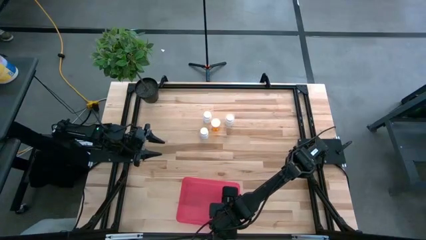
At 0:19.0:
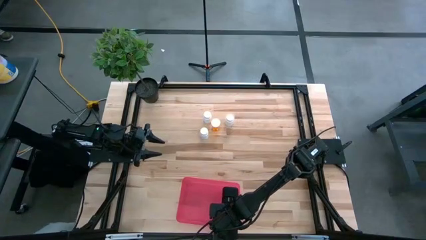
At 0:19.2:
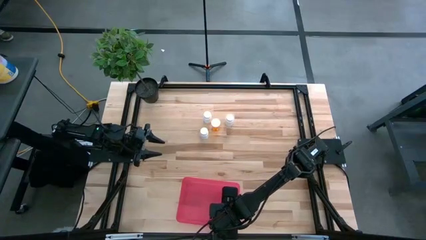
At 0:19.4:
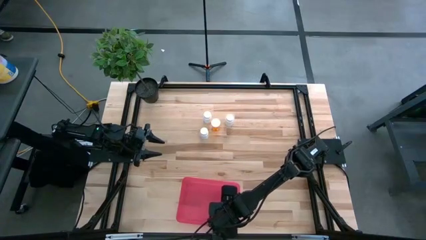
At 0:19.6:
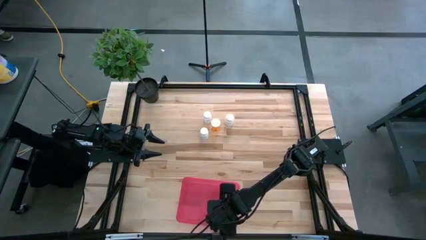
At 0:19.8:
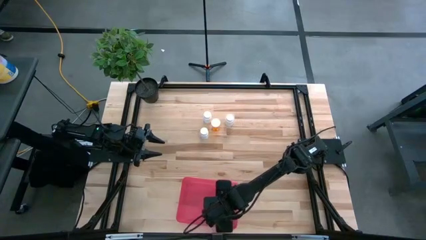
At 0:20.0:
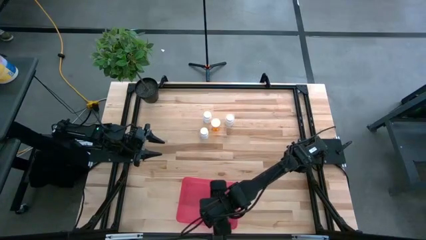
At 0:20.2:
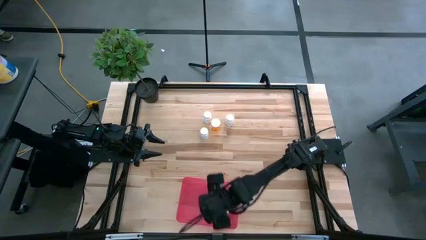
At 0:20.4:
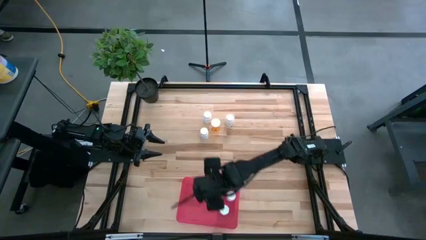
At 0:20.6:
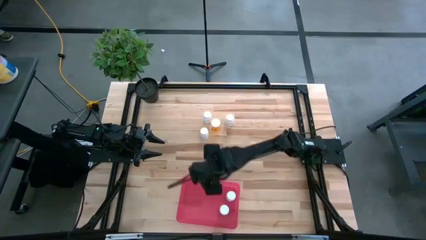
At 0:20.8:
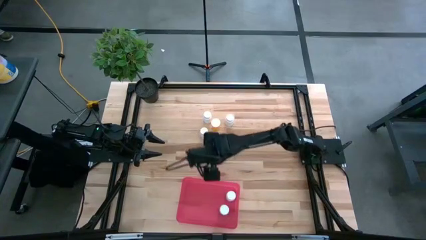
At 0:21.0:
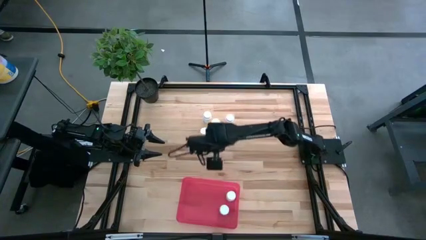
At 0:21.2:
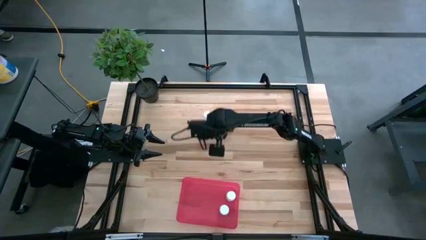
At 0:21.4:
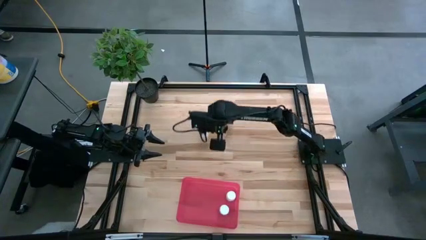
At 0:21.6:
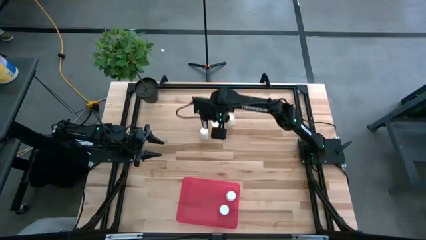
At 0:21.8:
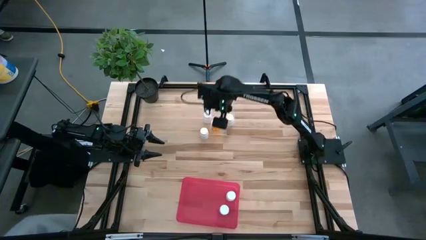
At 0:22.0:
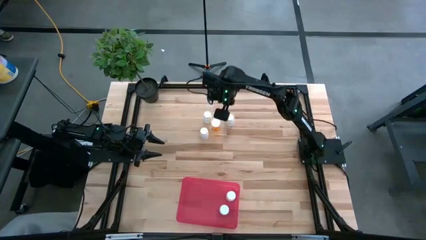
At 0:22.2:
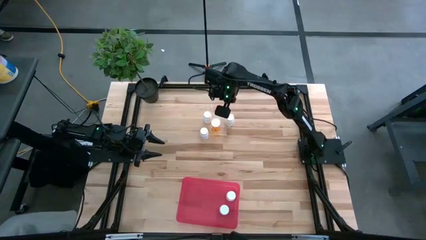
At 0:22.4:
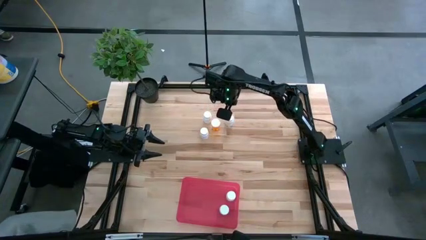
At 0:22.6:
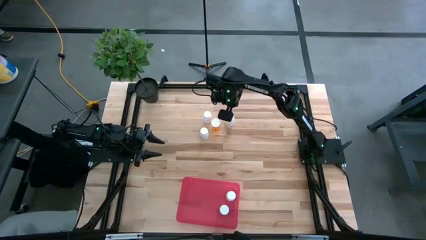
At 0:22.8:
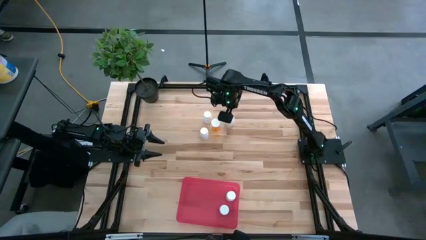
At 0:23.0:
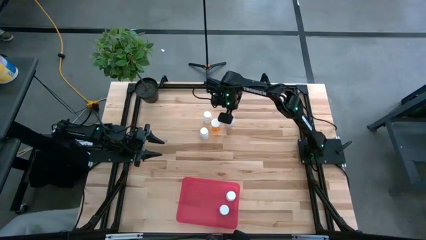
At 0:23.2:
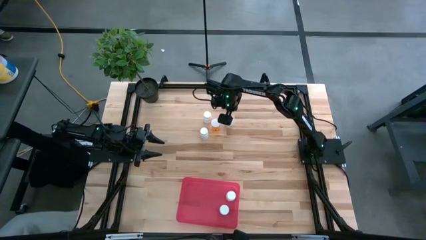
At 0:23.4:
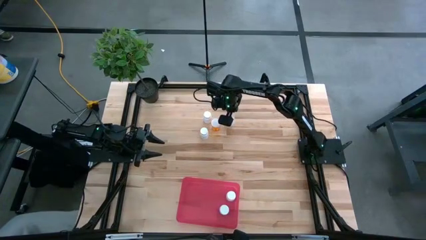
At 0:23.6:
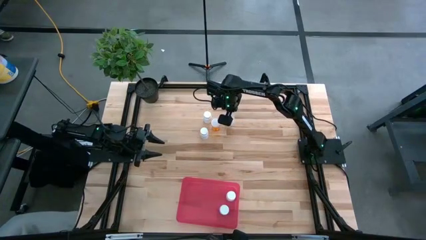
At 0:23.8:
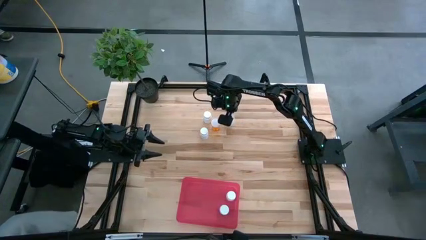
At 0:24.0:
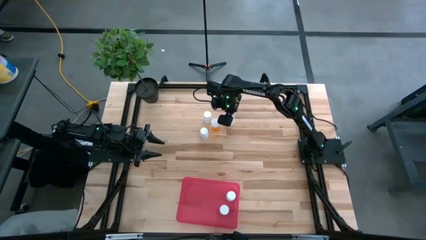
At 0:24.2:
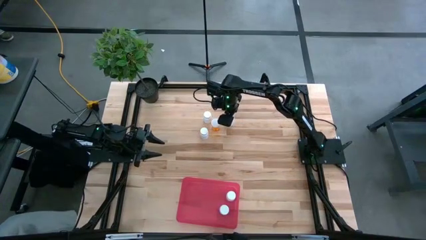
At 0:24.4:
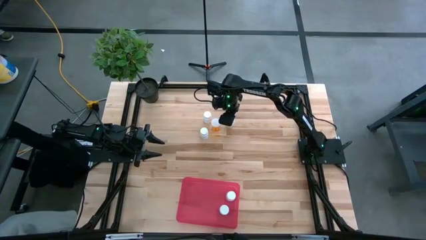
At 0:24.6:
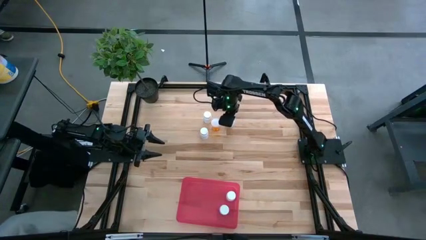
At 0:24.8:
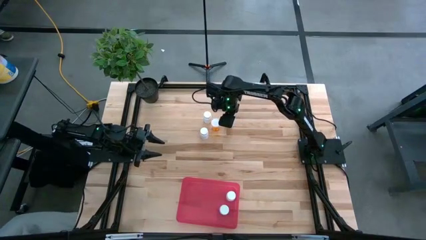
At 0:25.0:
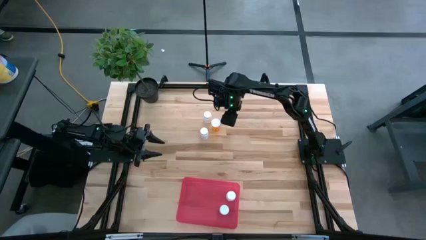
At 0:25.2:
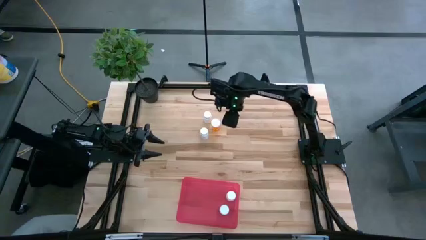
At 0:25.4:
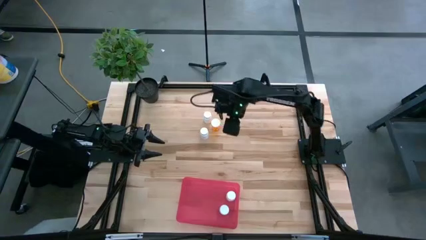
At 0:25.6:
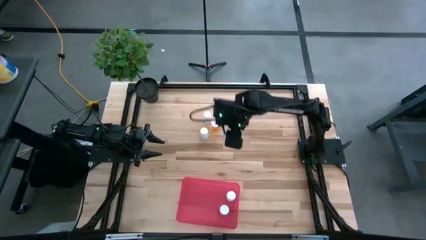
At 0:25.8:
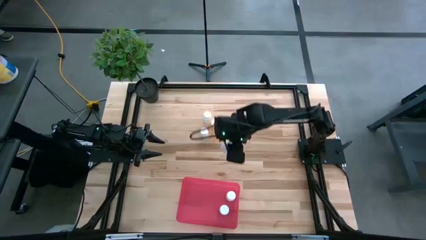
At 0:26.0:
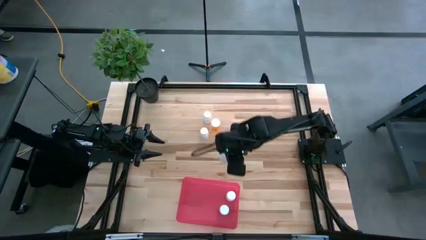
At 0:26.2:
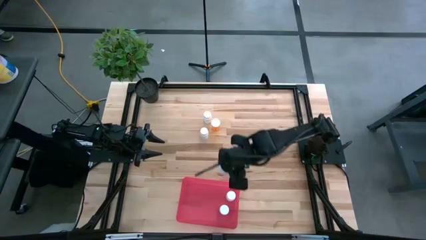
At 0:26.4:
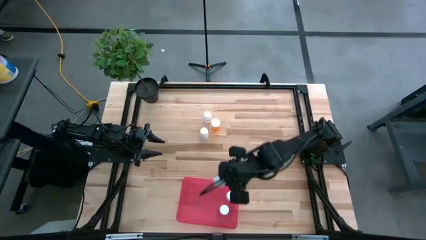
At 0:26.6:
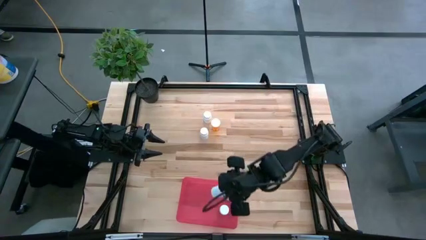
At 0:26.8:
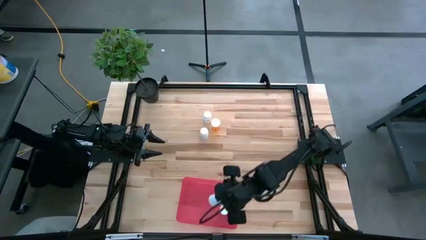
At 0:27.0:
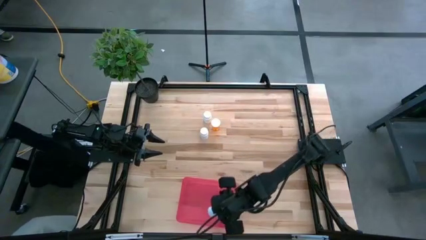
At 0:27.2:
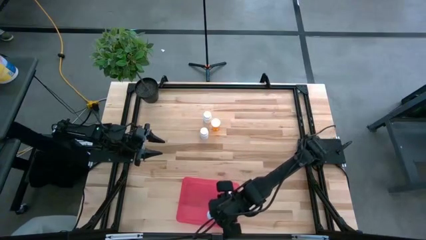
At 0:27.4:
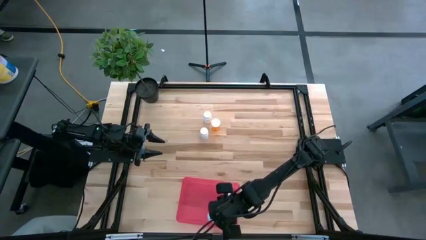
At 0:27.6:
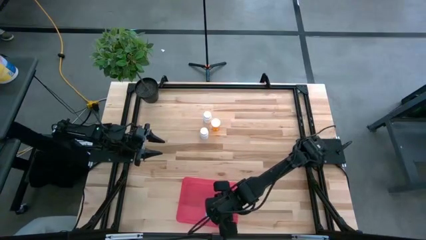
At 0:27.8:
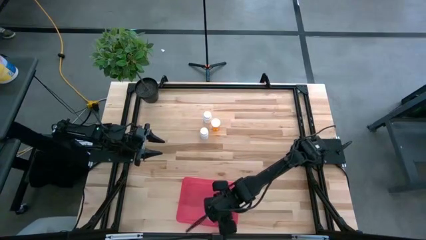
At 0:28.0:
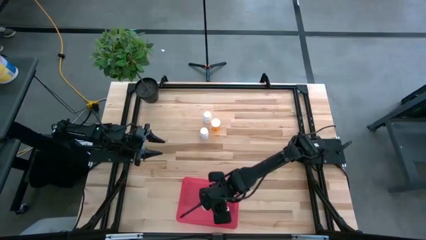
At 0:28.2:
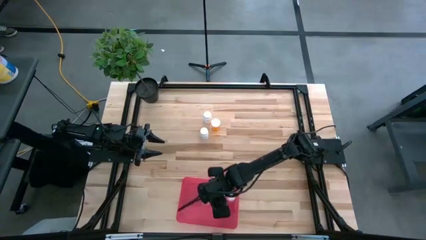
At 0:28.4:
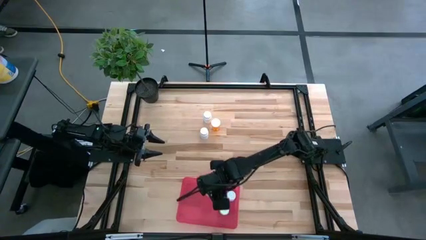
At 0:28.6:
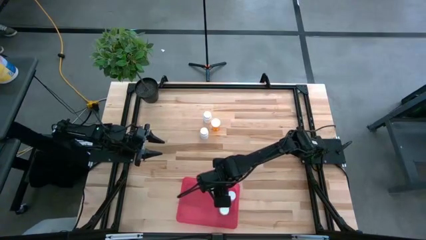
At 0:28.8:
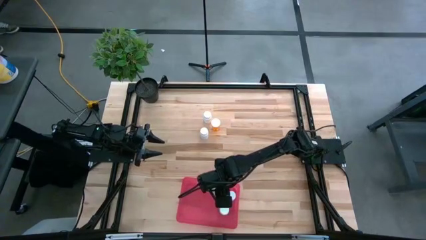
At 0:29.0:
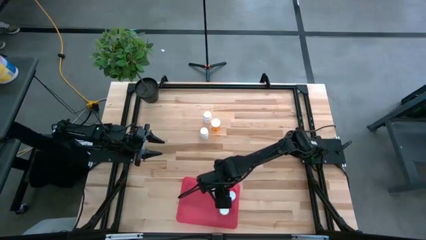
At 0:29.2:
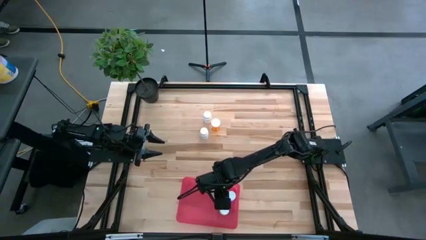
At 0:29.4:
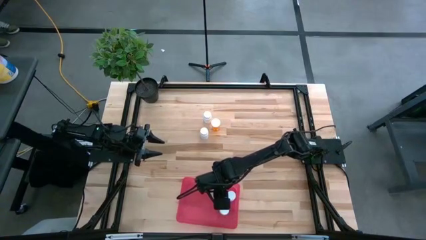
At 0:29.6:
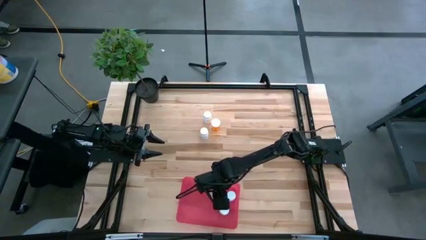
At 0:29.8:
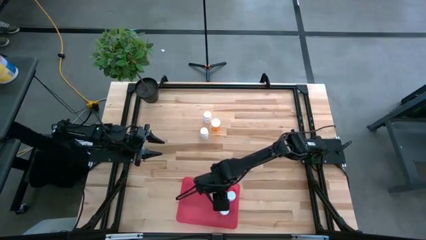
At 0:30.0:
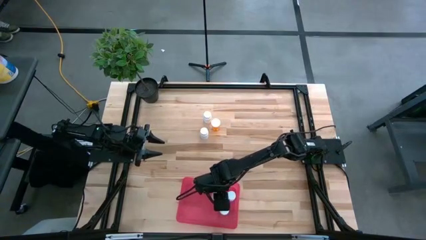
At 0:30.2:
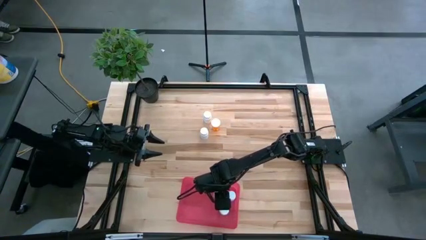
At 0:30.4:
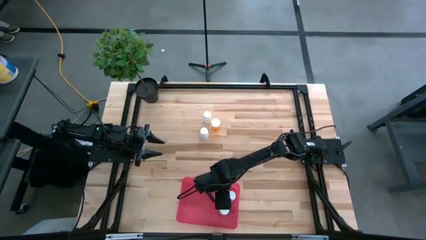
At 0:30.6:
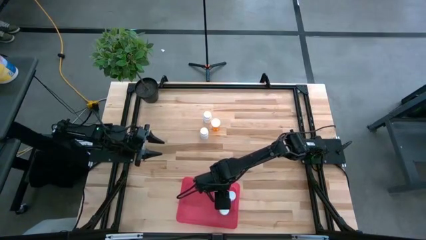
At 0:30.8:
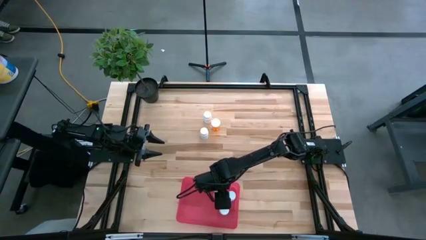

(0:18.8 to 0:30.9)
Task: Pick and place pill bottles into a basket
Put the white pill bottle into the red bin

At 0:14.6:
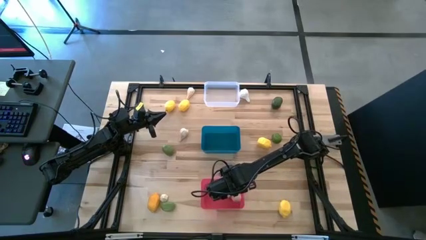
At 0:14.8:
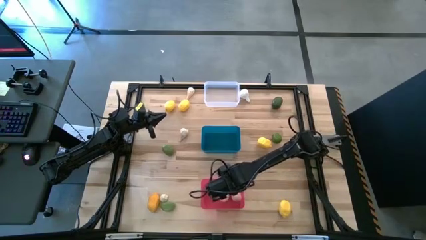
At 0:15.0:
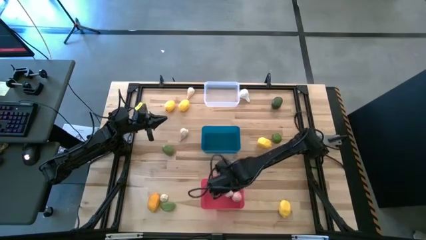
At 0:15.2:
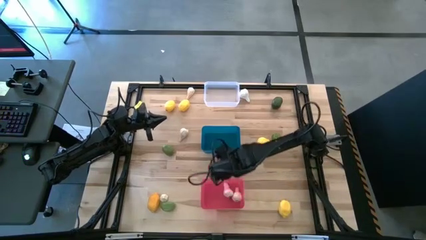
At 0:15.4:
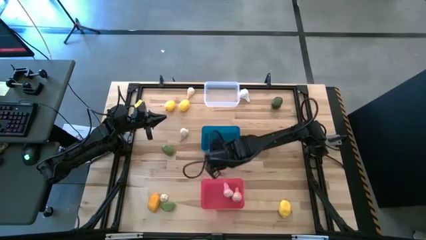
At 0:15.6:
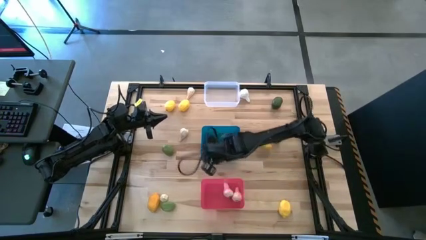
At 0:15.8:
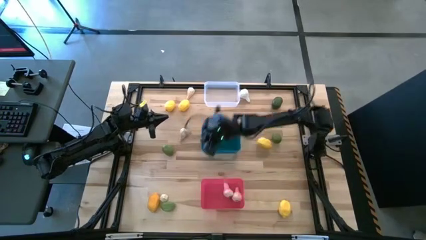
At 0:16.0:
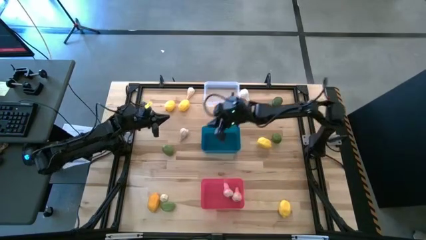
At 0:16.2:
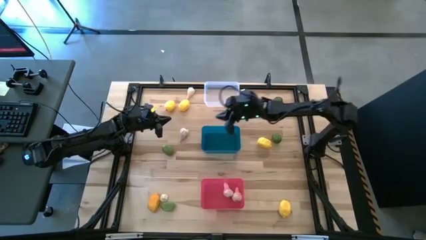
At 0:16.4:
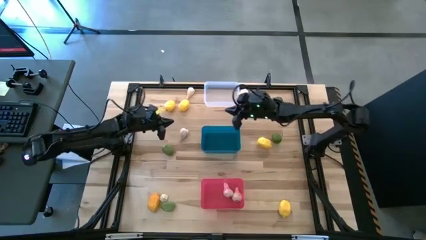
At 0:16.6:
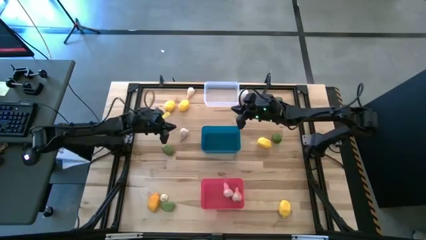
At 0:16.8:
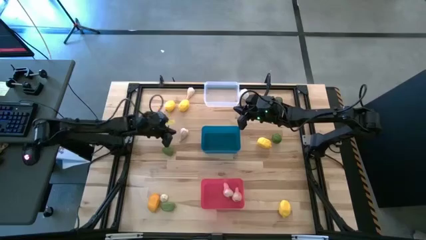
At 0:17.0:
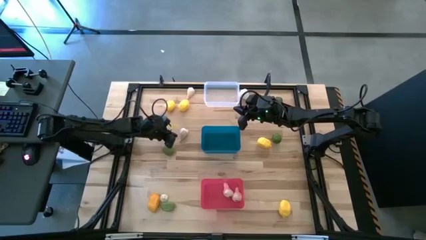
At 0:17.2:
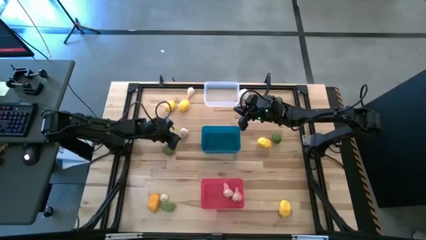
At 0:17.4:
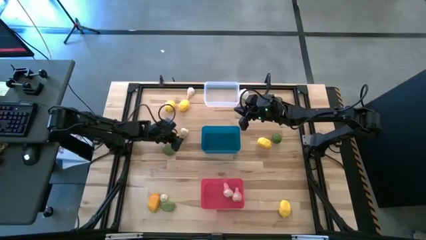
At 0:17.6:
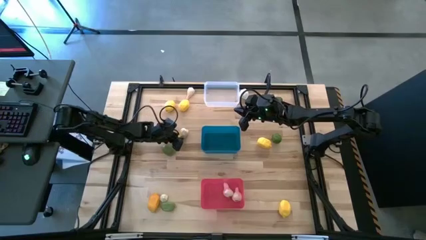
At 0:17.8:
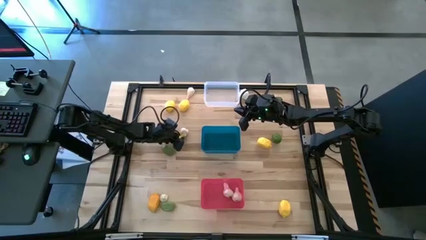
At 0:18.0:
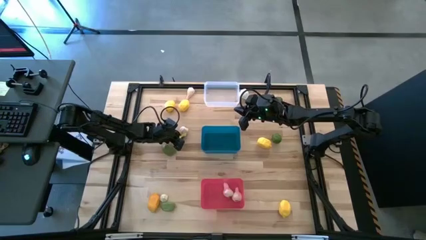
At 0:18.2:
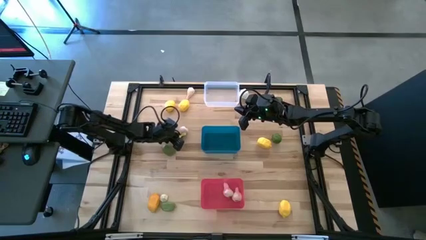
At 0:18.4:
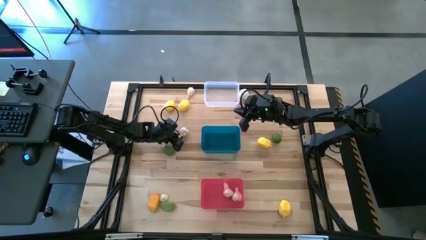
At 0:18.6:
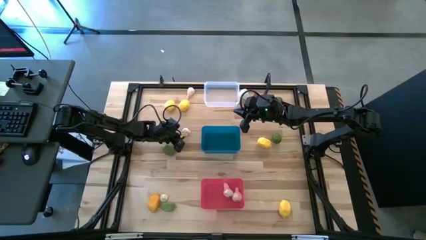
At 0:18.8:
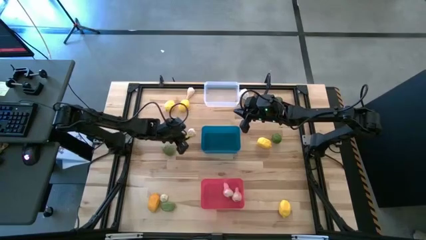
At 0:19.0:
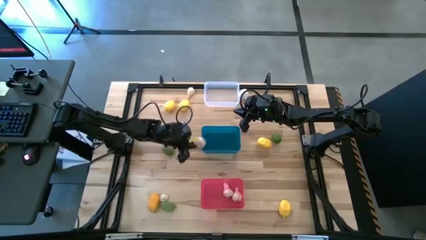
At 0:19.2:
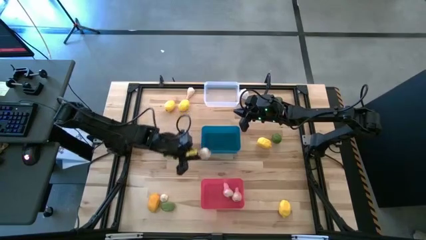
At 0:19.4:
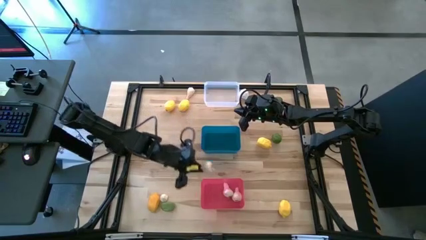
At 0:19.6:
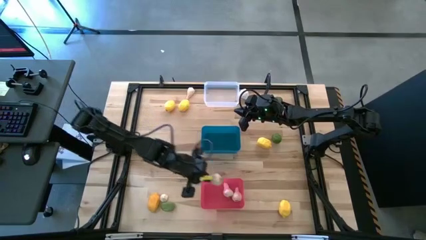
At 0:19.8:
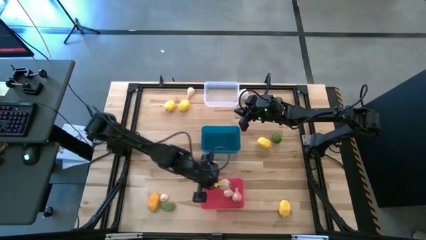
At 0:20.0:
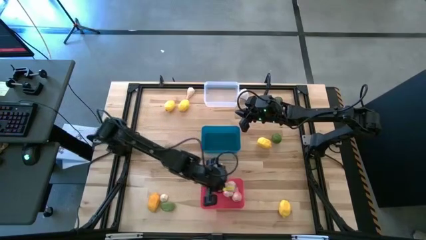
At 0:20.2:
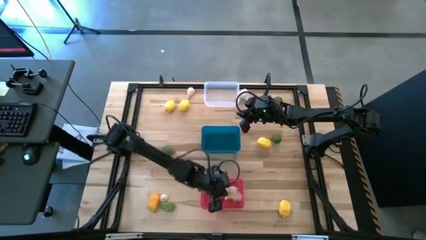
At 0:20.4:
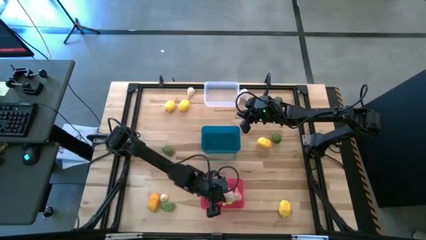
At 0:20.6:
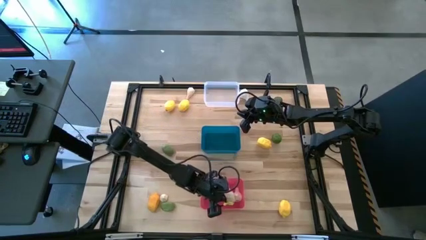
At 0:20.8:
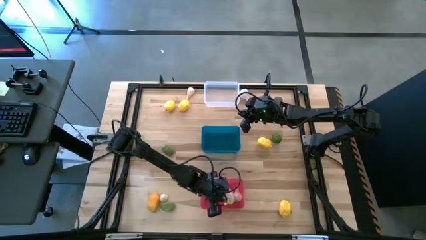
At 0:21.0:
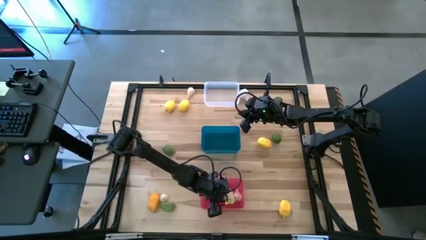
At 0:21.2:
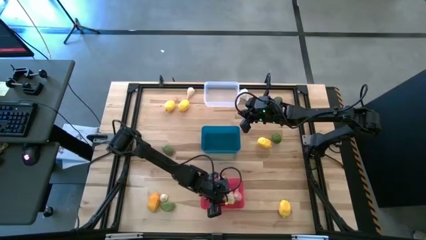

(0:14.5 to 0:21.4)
Task: Sort produce into baskets
Put the middle left white garlic into the pink bin
